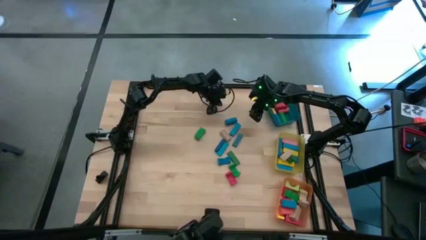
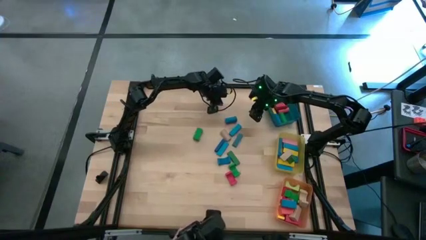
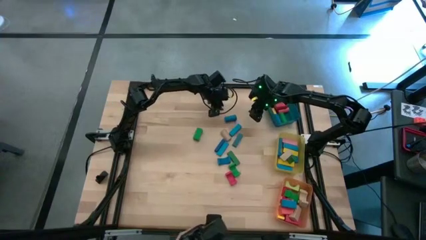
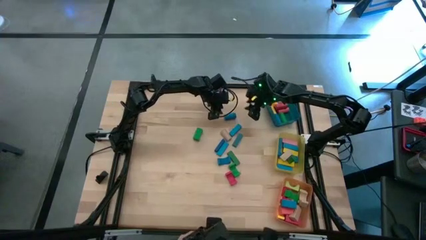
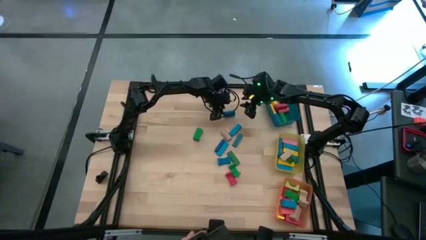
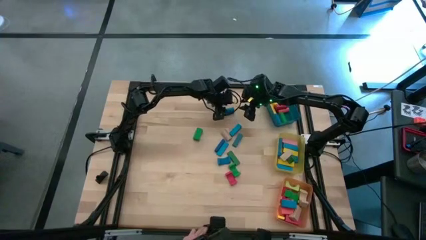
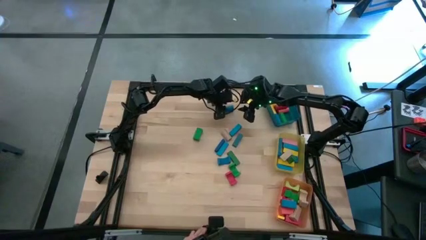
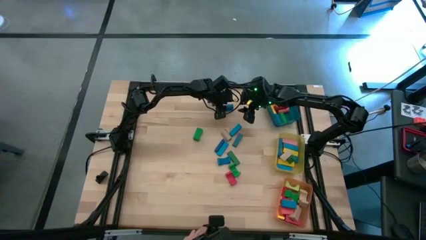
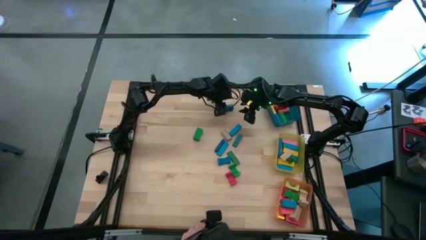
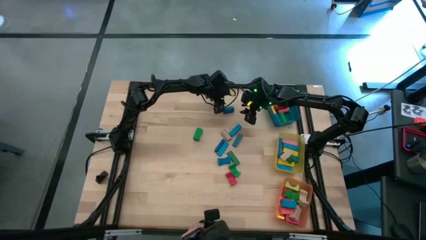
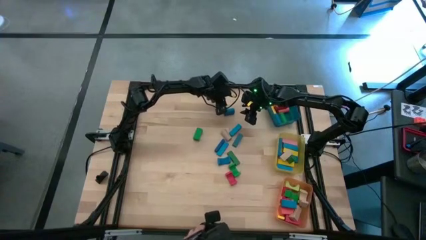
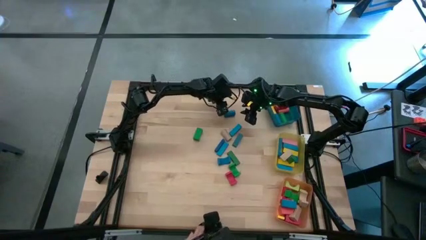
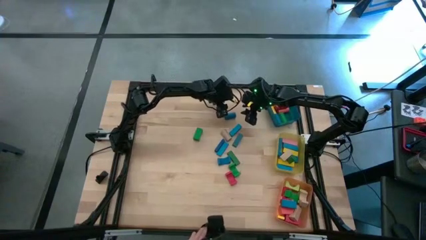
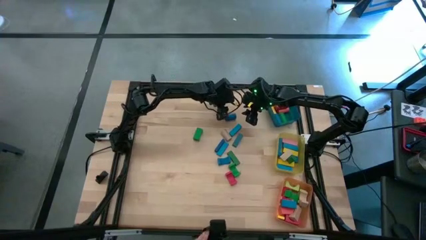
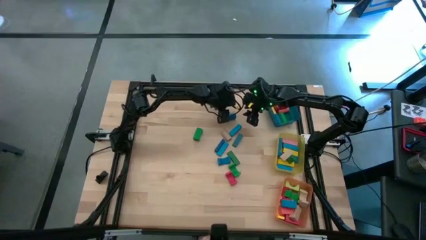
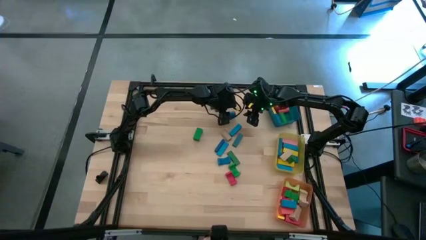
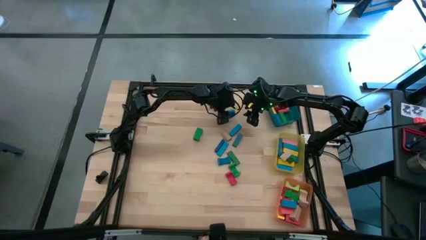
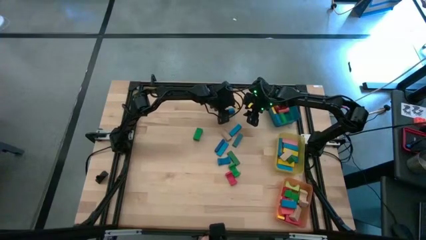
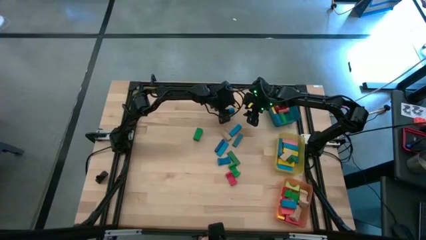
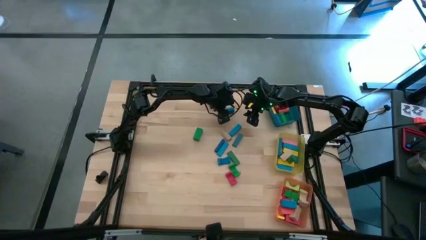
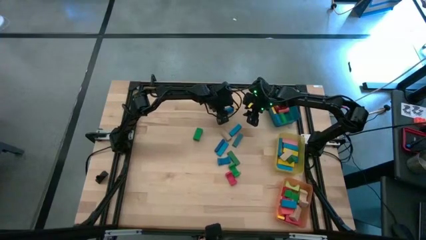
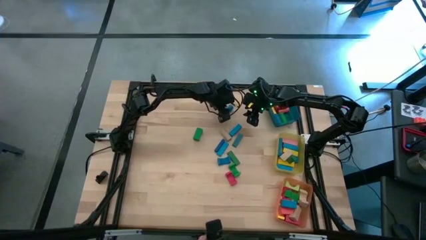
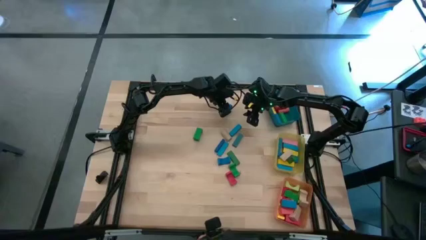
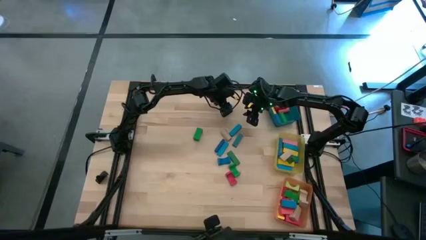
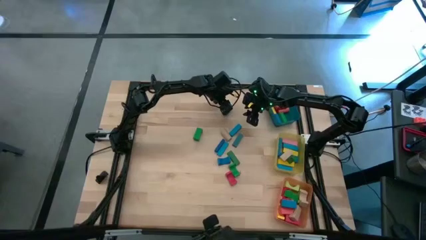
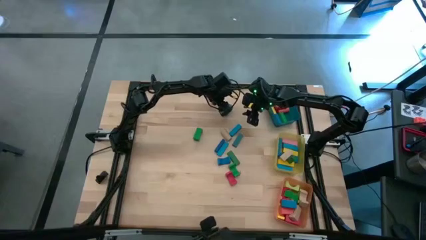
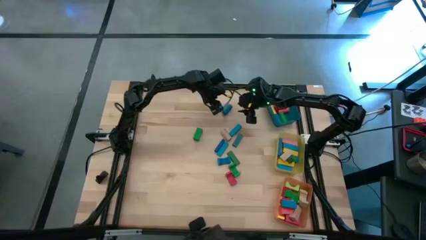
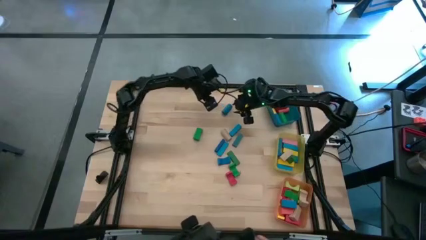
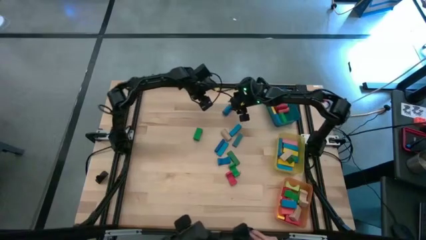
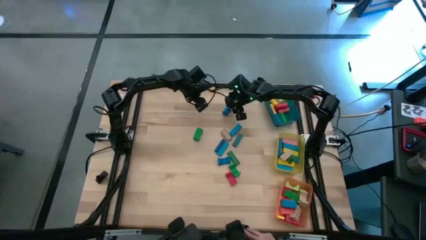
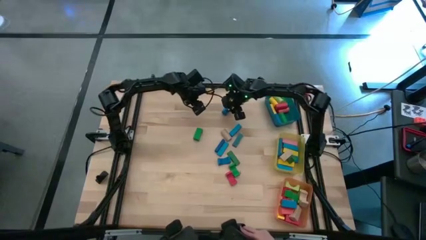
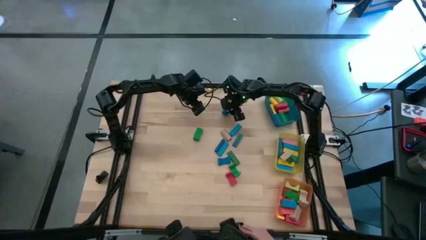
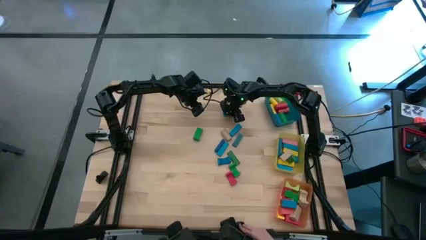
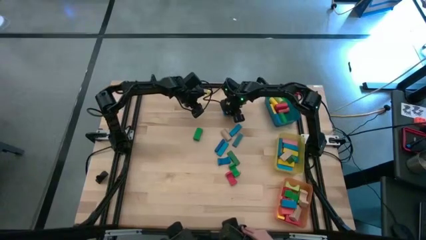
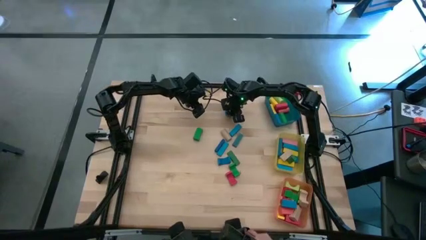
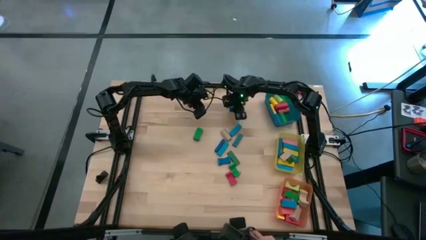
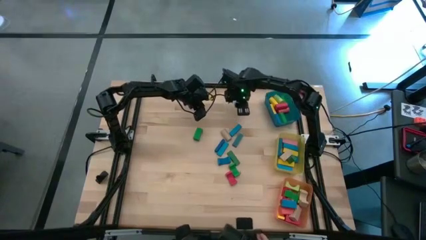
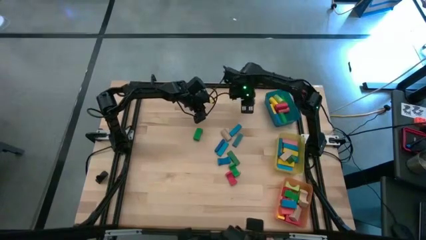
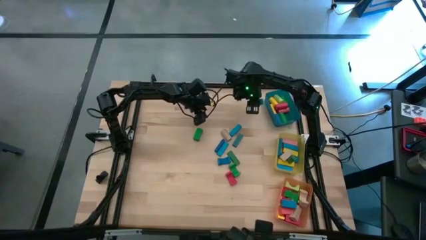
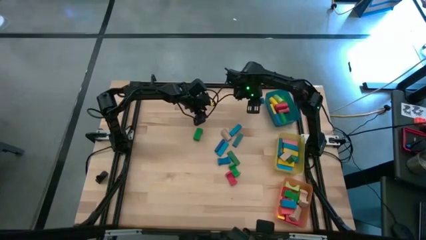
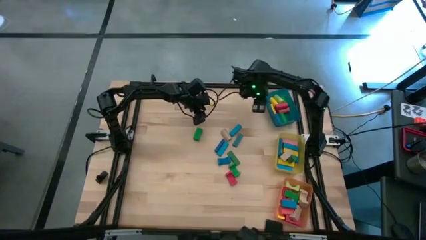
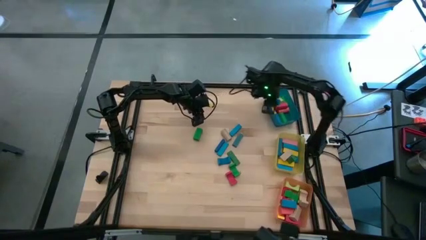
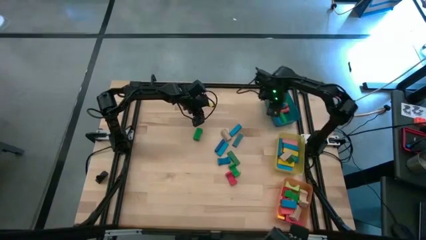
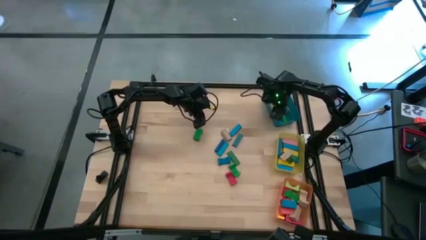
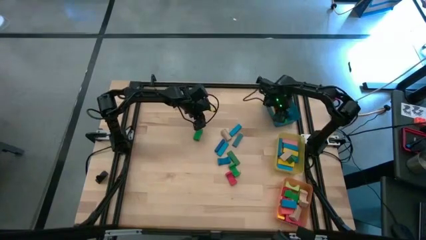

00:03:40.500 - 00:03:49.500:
Task: Sort blocks by size
Put the blue cylindrical block into the blue bin

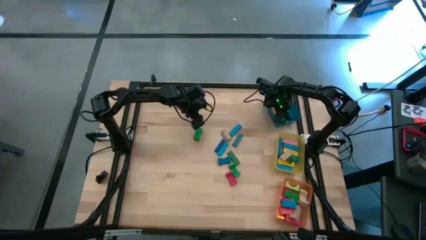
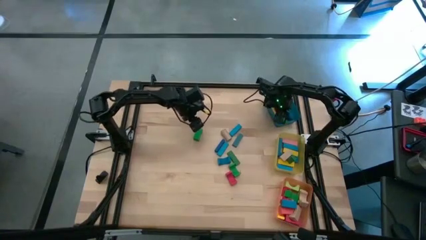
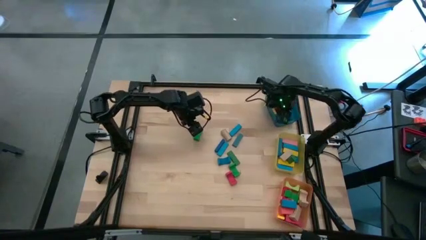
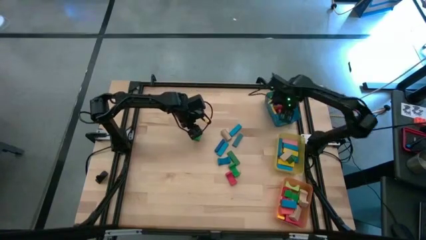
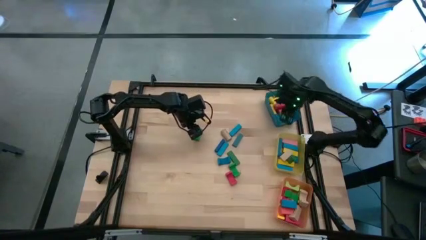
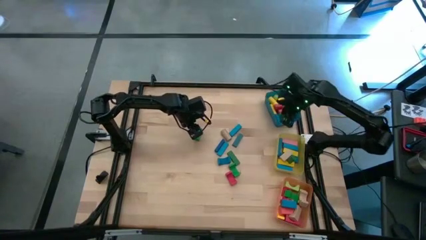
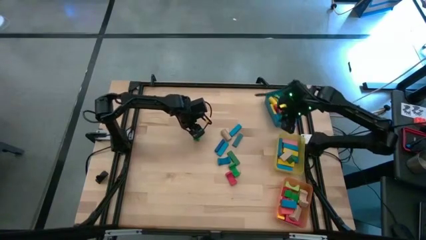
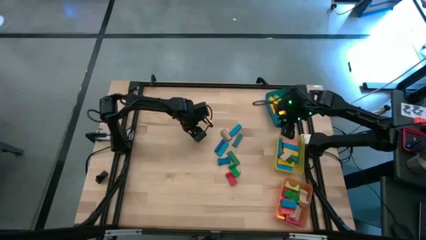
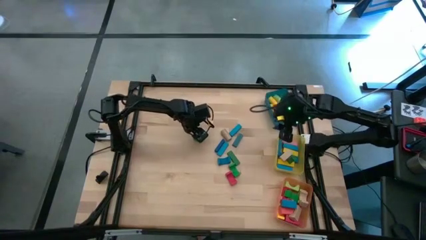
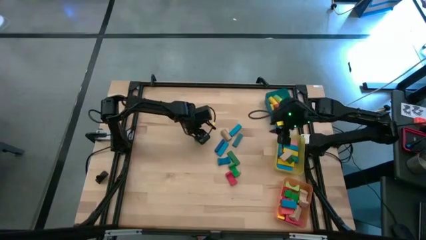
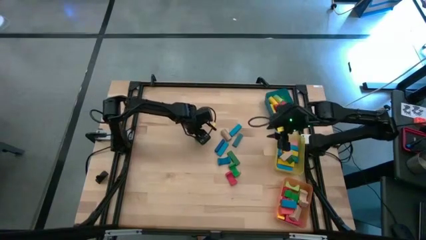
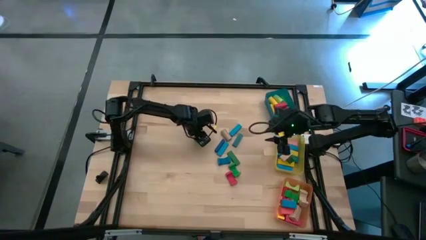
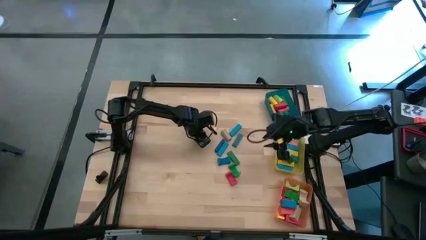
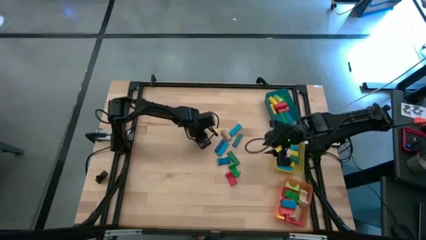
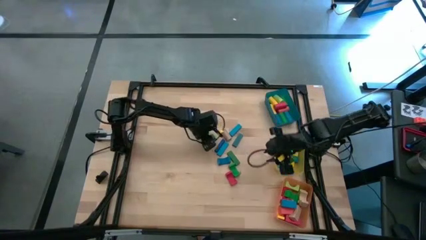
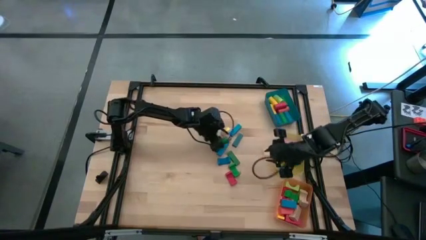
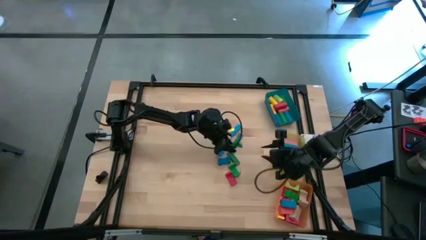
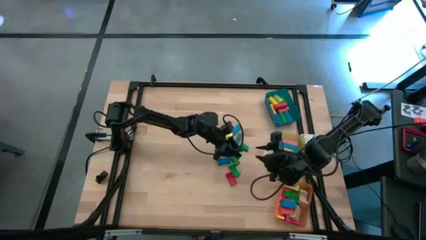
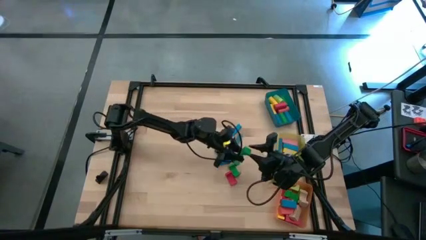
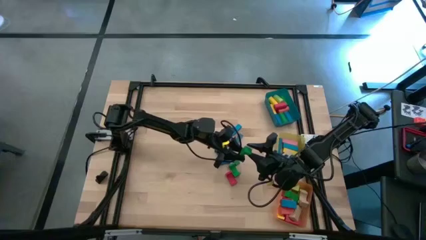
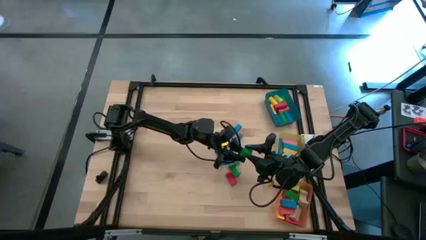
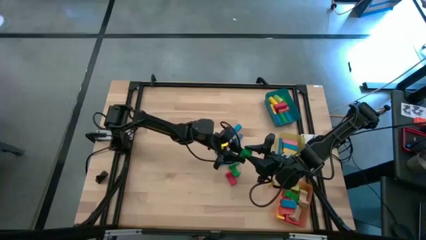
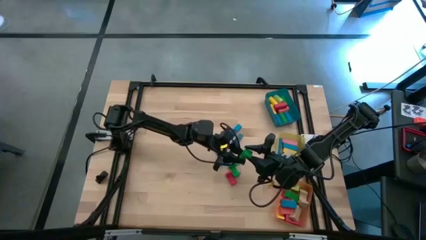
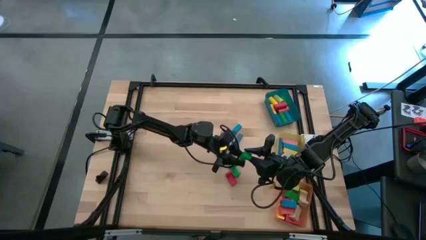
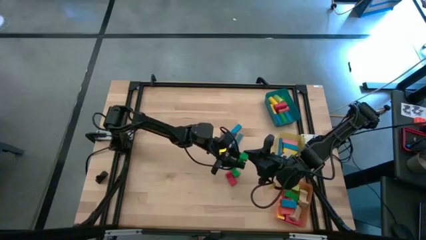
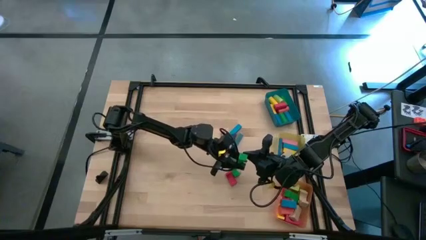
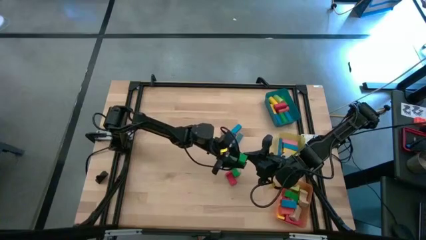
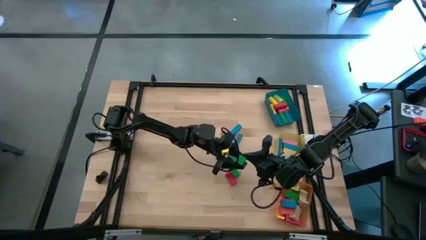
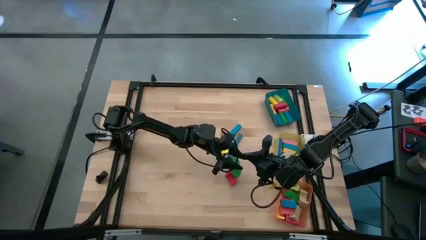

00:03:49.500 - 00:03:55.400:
Put the green arch block into the orange bin
